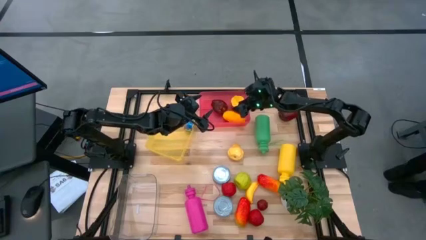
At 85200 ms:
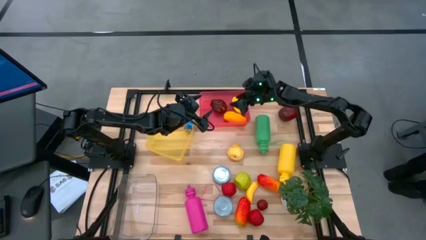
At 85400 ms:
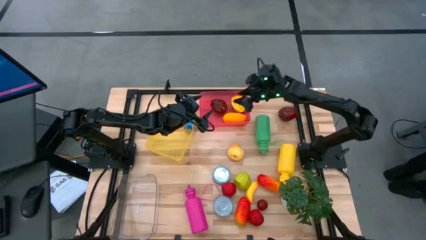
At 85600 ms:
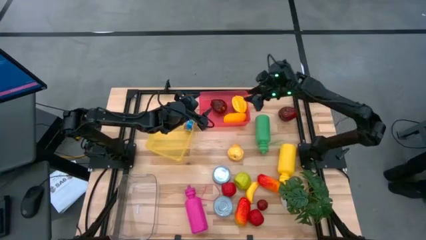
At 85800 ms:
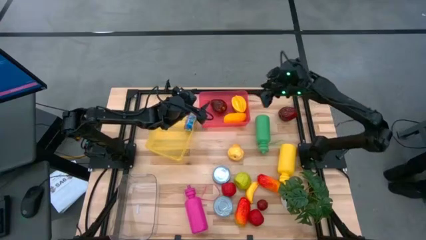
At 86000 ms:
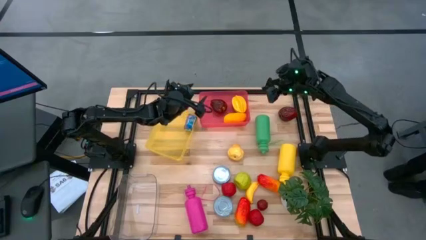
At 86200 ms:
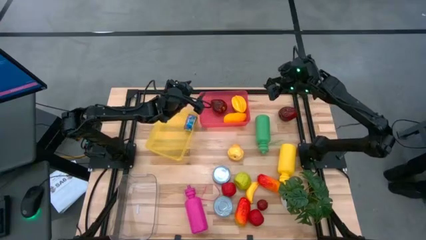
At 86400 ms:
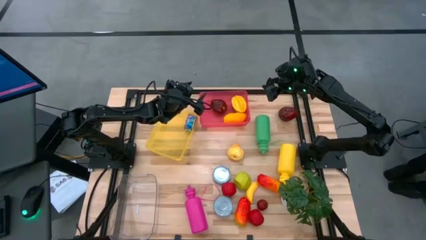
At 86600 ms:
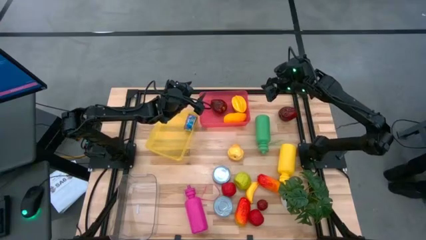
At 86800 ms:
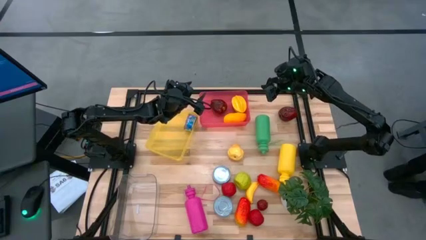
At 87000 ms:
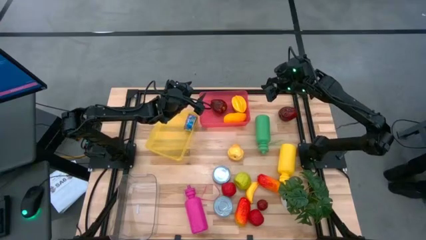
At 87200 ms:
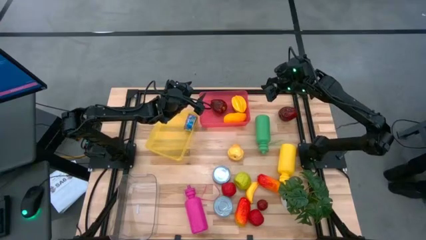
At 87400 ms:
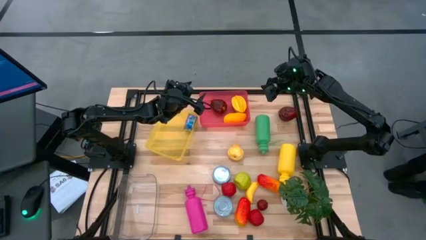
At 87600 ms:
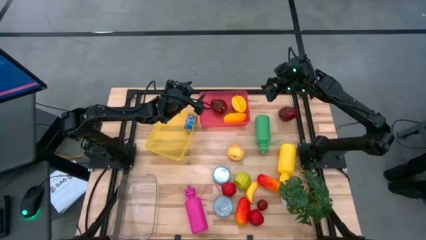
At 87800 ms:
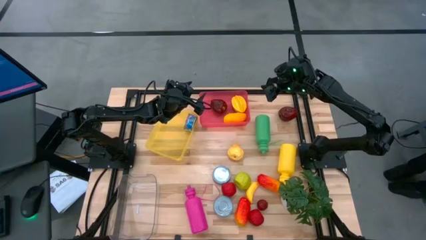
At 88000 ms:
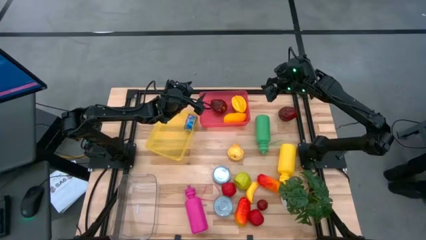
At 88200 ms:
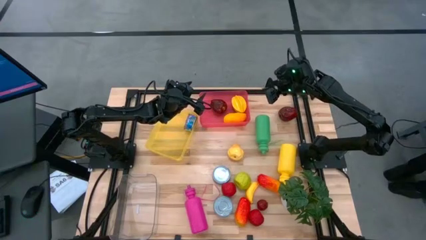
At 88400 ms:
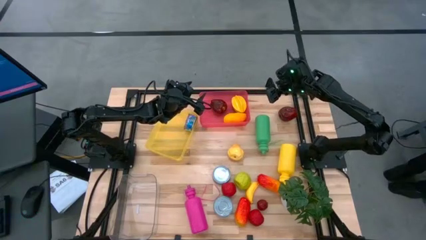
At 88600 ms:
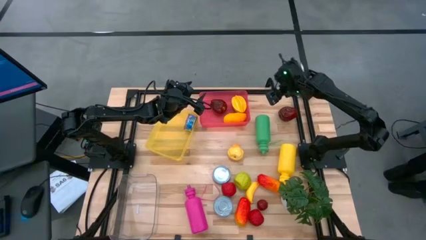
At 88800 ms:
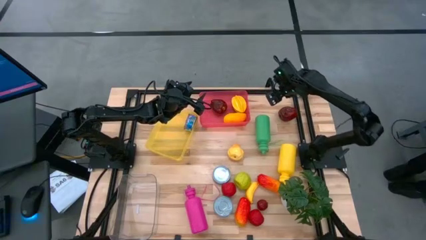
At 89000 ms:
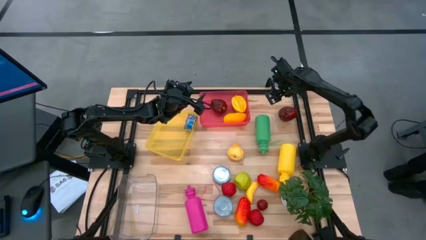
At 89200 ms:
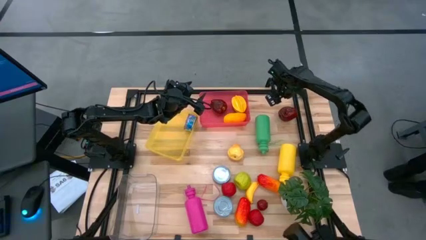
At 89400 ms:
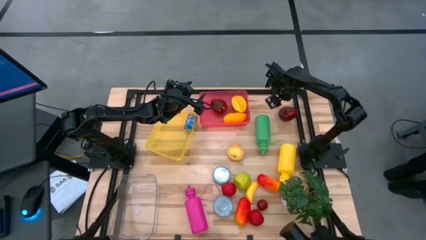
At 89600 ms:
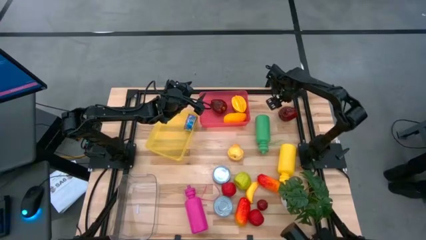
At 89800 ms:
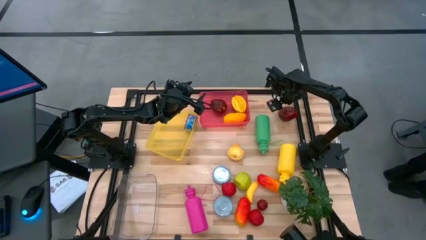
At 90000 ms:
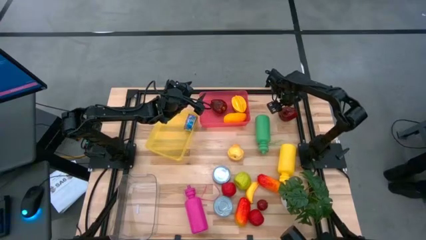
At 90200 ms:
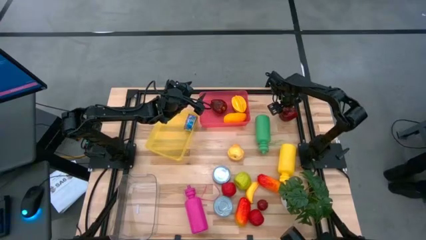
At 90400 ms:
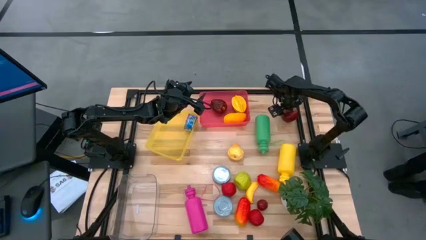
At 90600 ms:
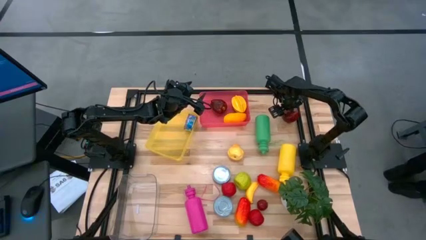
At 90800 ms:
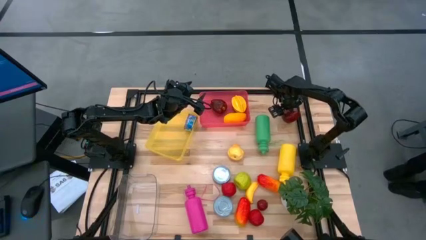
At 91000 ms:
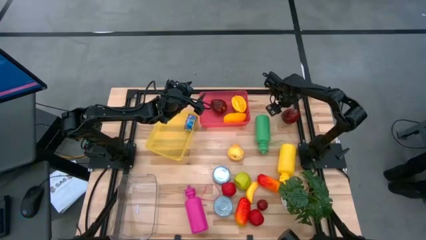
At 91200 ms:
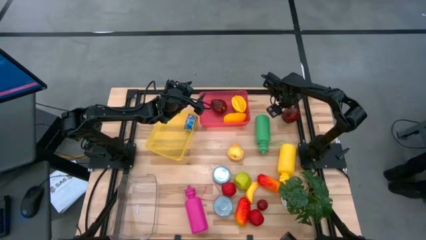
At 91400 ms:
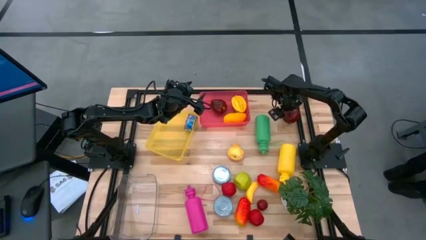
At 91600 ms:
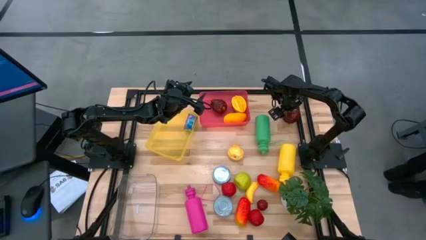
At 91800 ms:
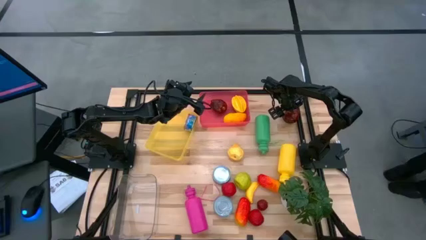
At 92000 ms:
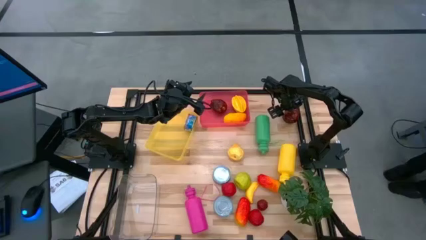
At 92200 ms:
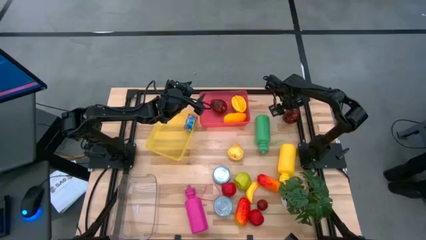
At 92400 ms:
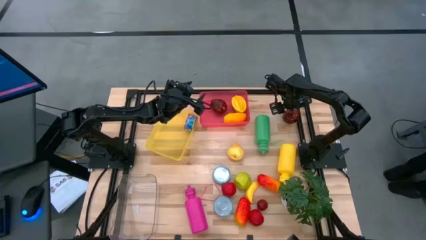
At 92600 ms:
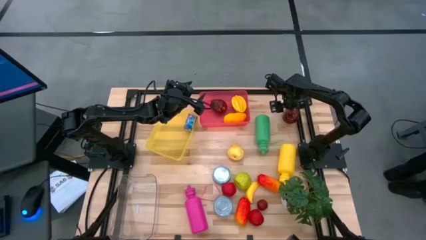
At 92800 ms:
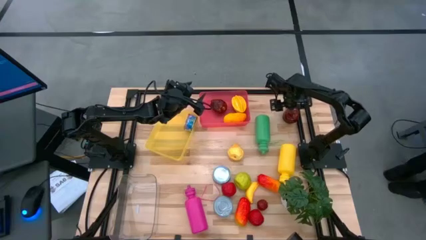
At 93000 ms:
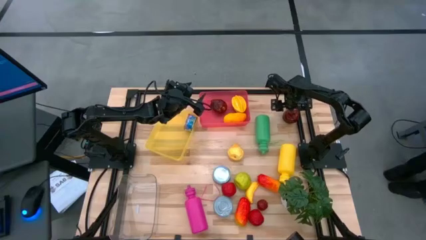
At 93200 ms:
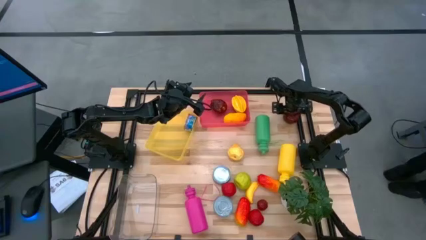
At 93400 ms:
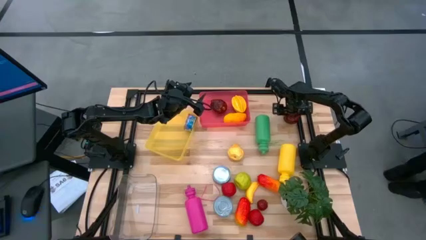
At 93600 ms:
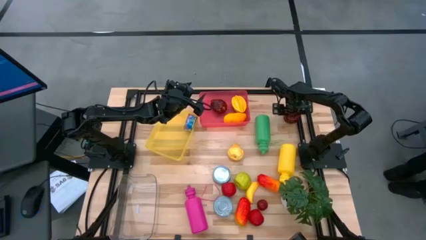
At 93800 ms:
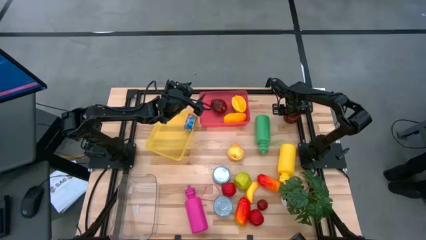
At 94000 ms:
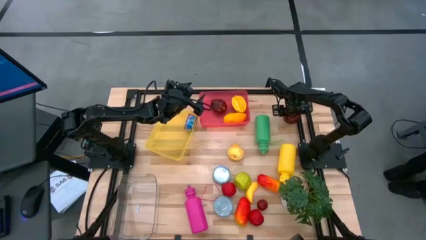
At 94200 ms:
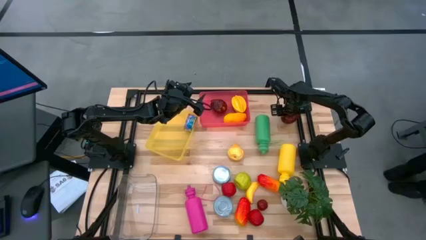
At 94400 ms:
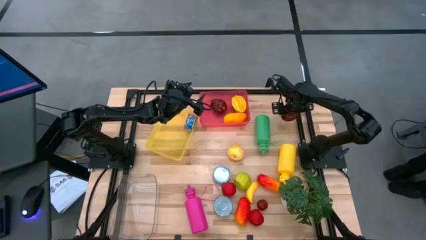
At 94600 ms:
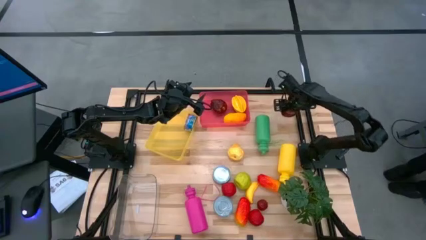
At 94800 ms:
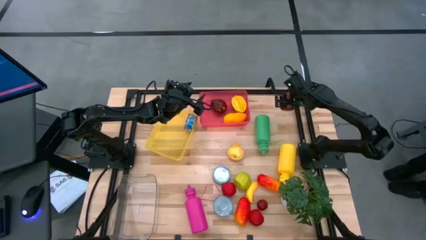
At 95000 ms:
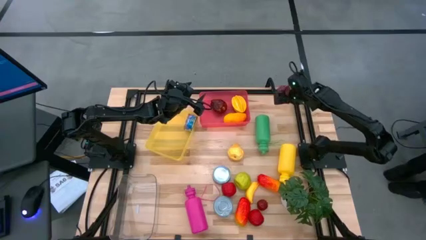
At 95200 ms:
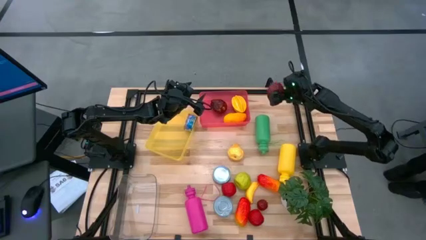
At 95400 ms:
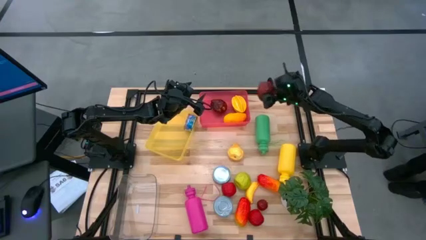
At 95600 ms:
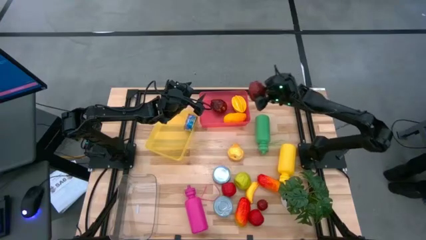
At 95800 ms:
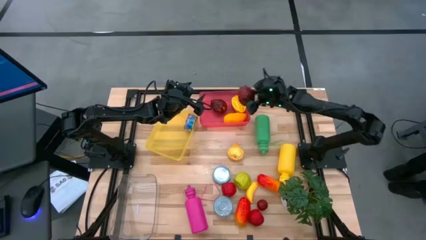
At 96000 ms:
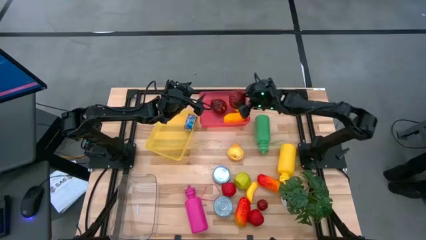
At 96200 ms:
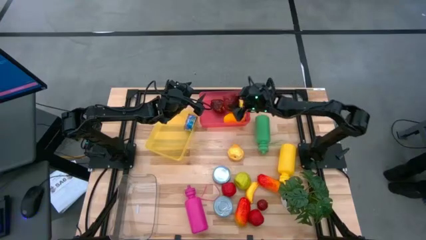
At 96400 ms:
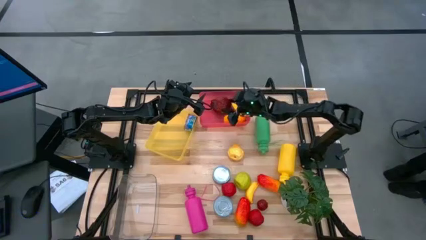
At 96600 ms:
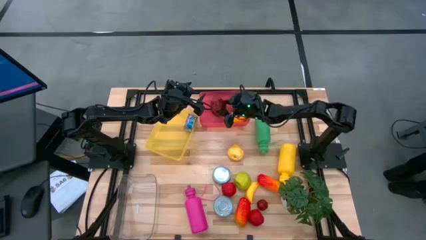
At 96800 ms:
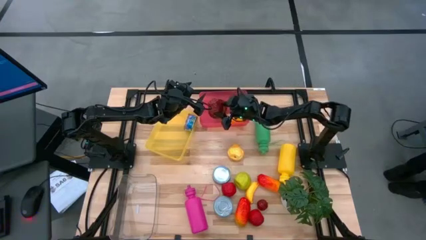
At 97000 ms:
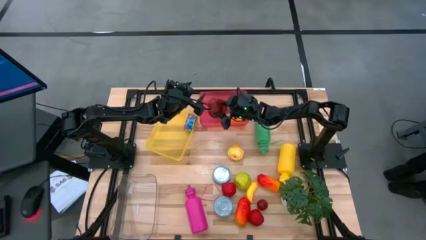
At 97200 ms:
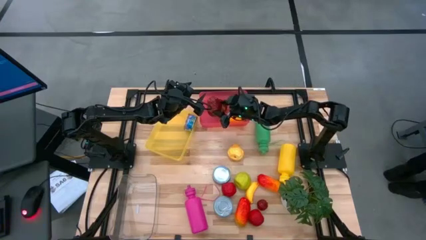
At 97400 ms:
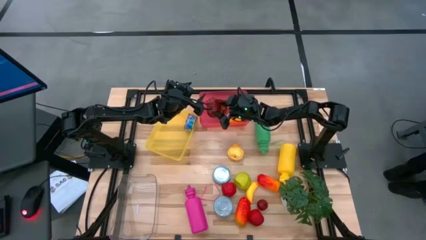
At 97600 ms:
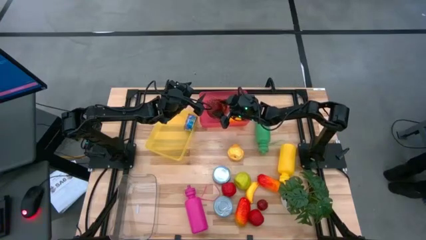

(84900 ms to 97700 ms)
Task: Pick & Place Food Item
Put the red apple into the pink bin
